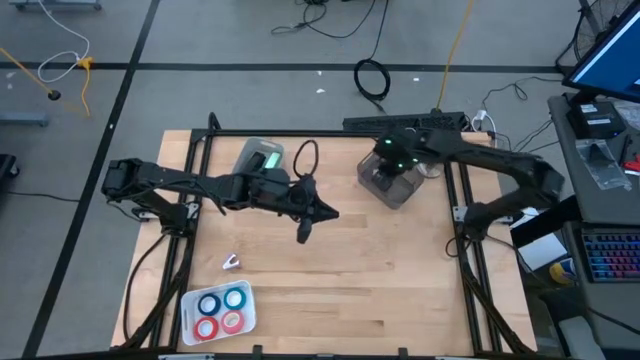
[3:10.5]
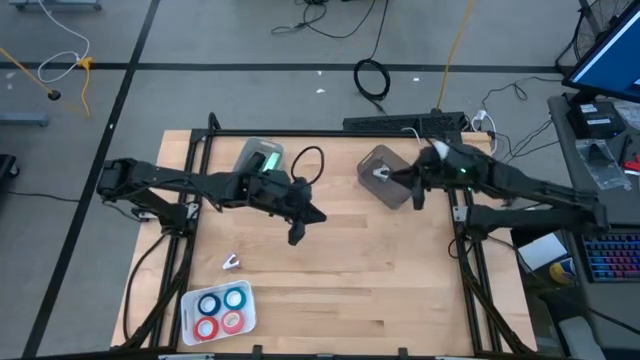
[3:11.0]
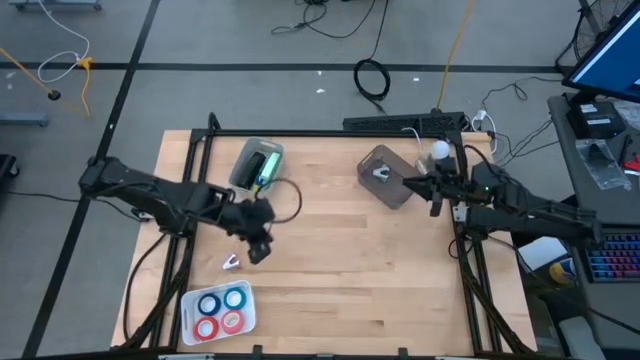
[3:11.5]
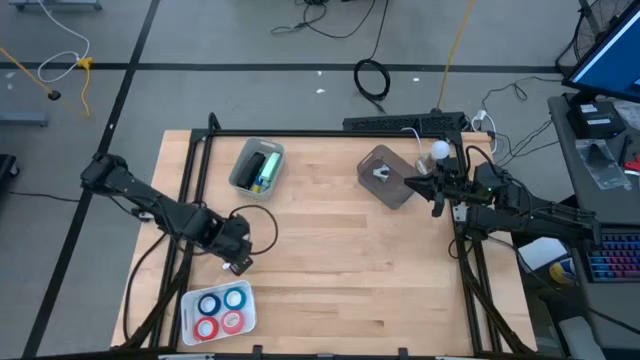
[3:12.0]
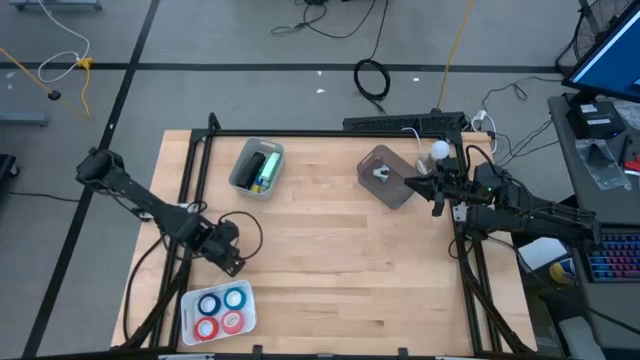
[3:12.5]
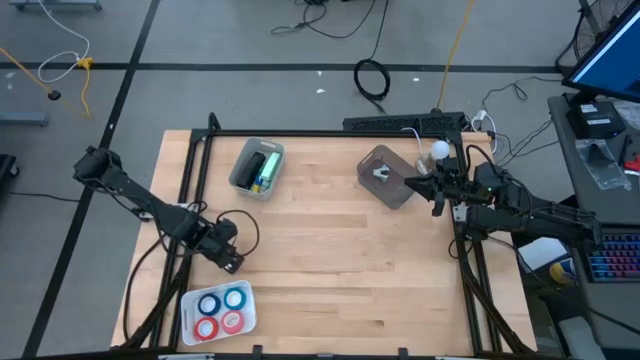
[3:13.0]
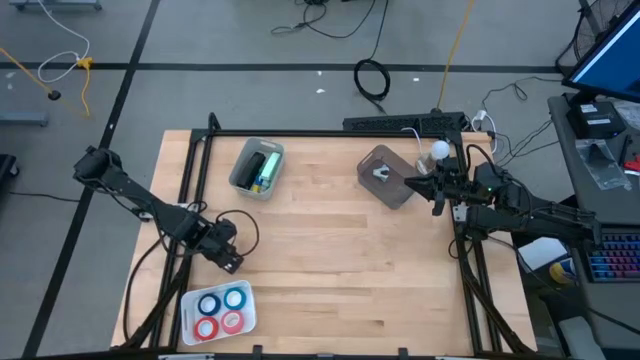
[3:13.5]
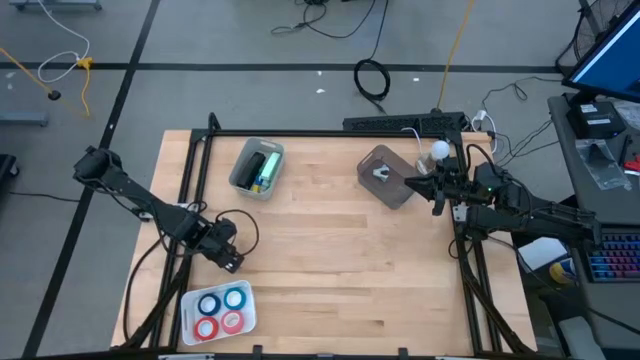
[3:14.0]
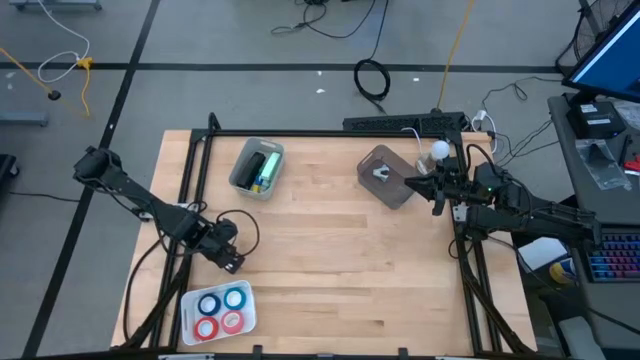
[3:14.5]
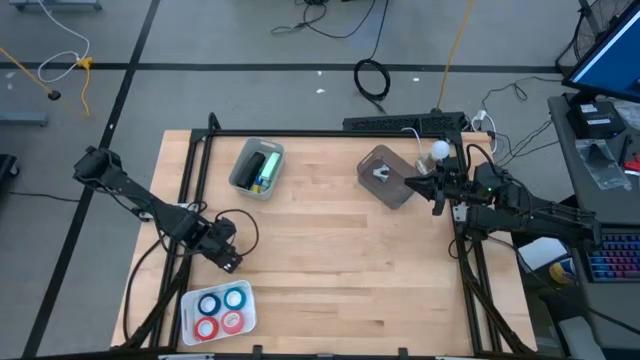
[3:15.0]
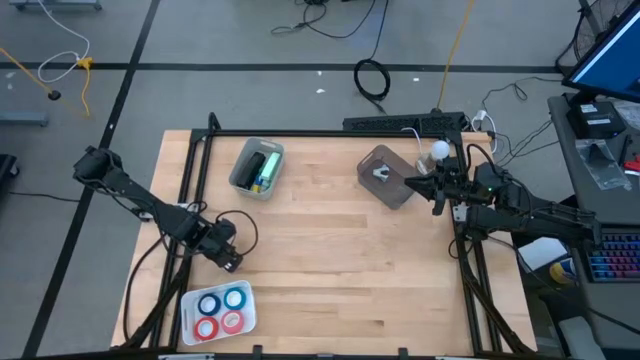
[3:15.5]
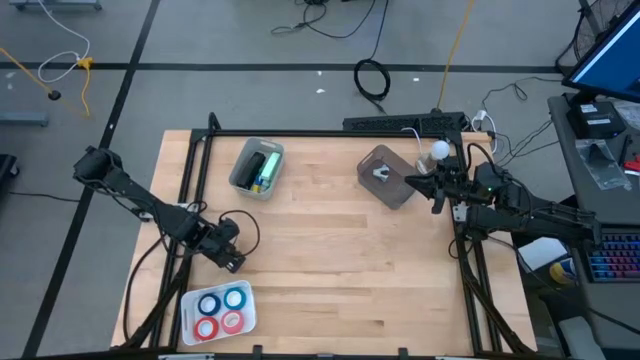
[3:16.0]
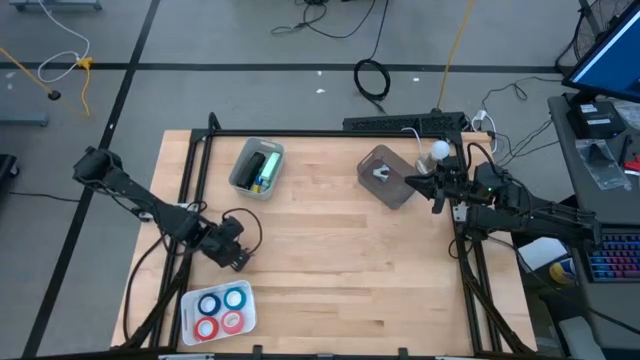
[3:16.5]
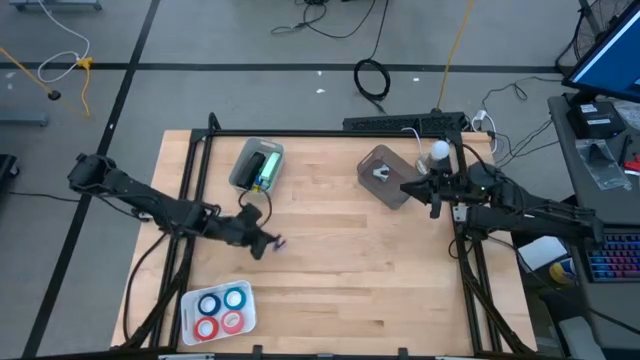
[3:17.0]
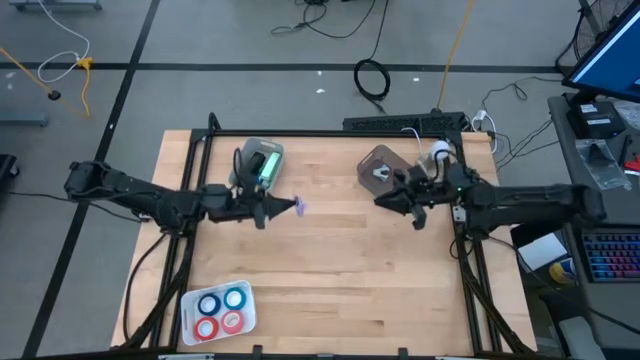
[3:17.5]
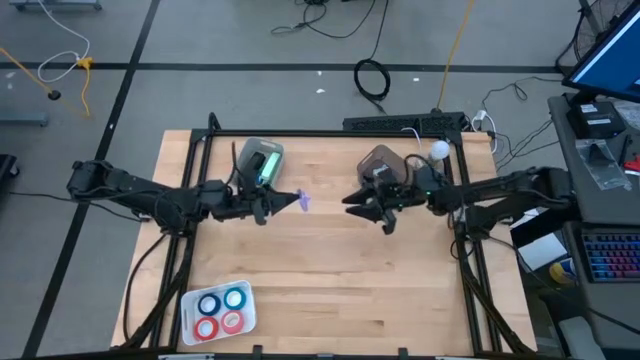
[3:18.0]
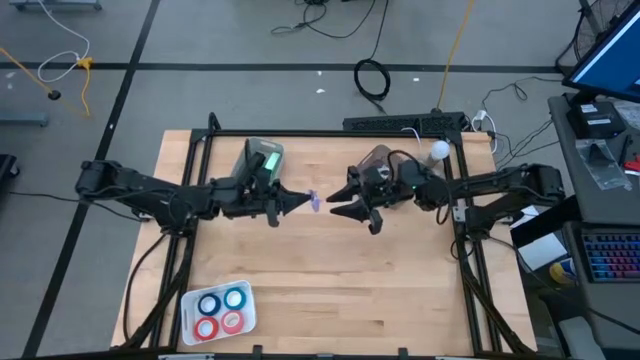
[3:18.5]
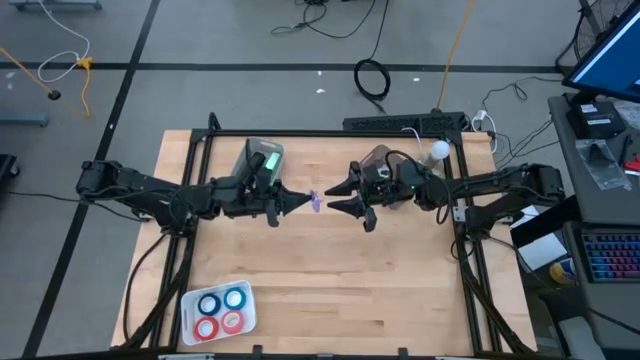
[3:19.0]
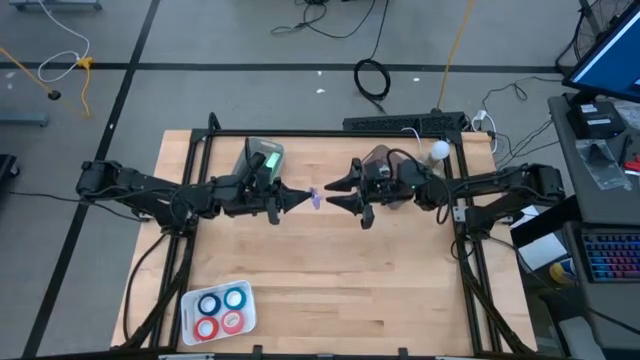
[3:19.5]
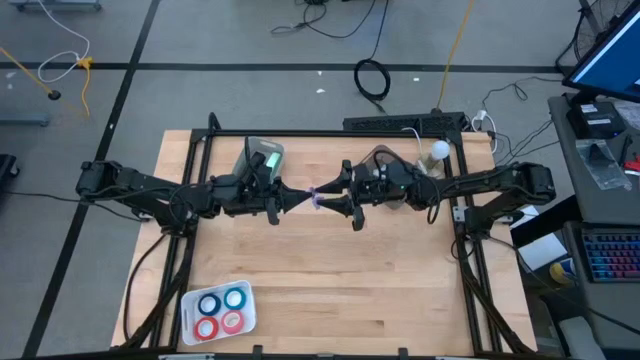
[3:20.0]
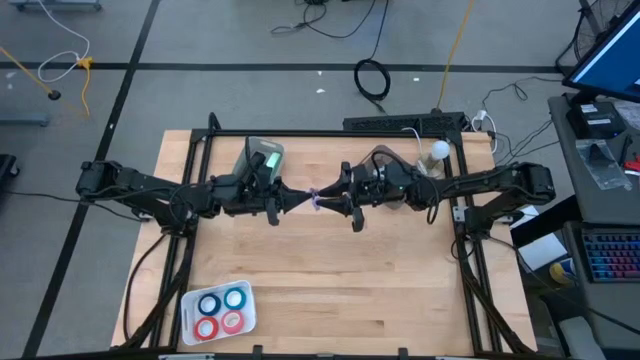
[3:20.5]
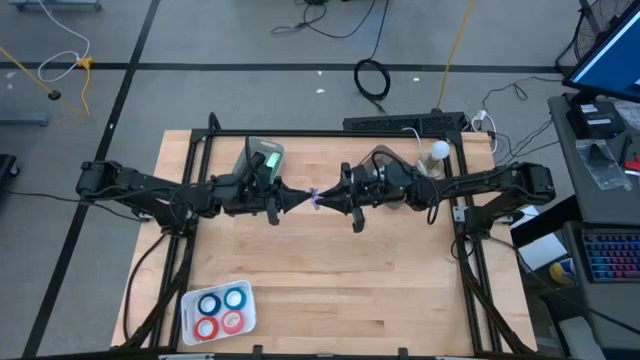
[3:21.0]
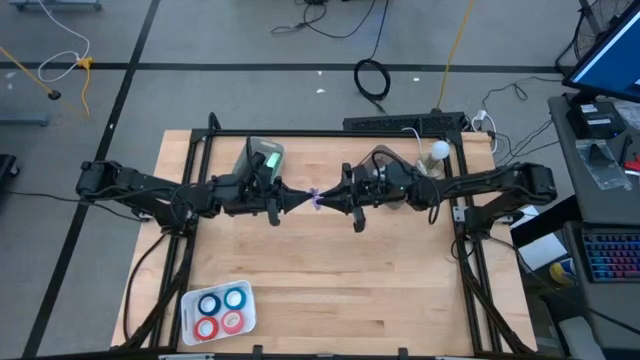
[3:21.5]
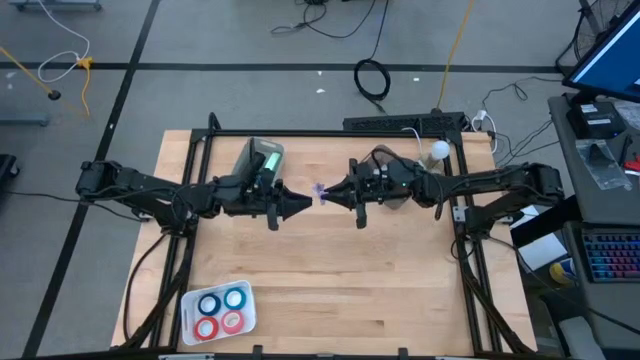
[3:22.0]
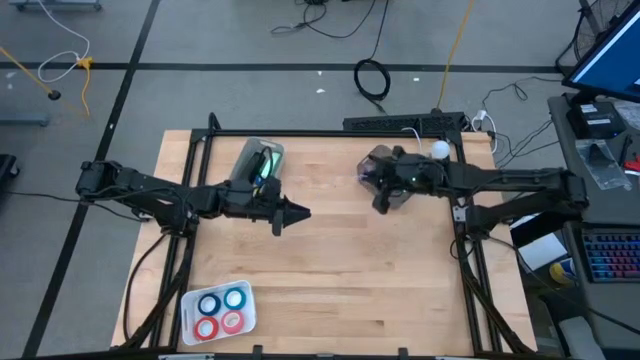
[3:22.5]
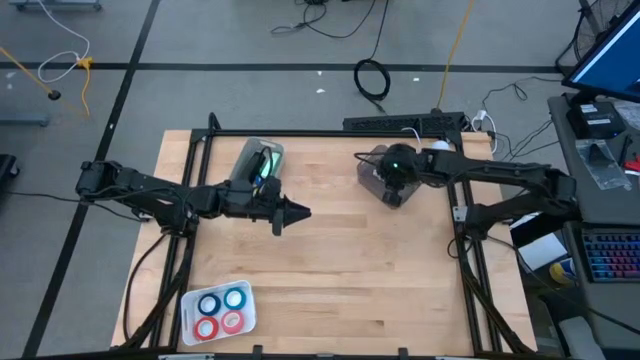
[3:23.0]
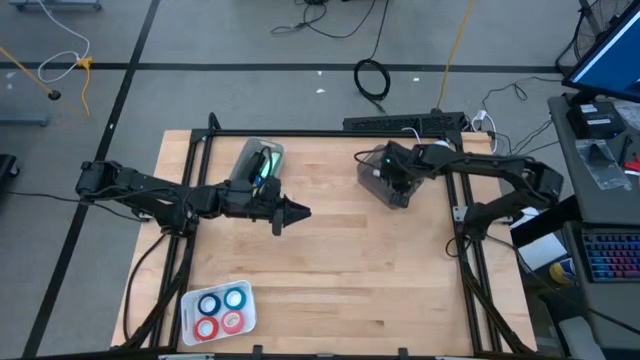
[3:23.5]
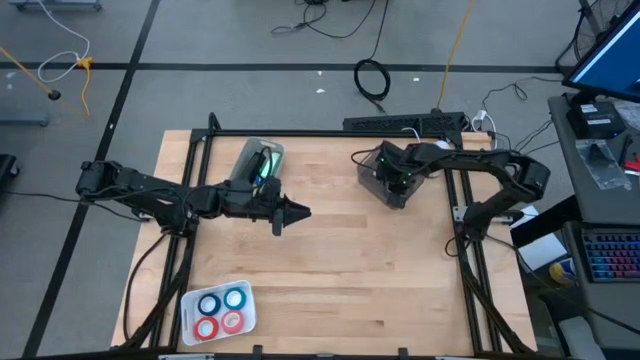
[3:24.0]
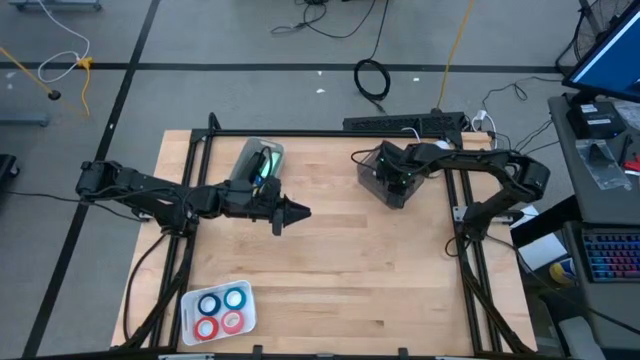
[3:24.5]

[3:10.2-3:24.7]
Task: Pick and place Stapler, Stapler remover, tape
Put the purple stapler remover into the black bin

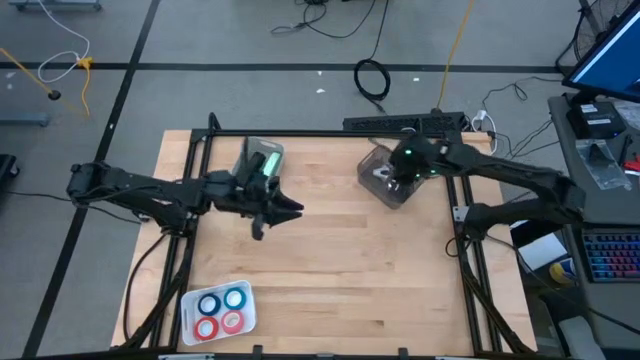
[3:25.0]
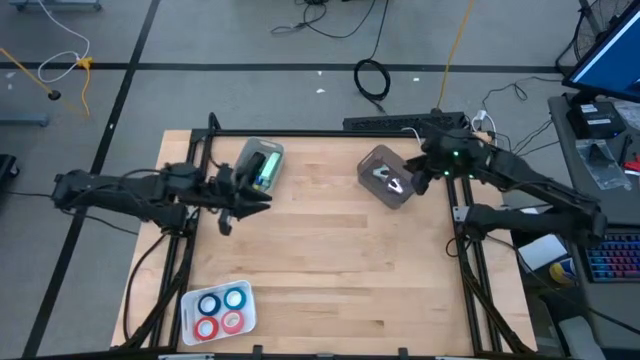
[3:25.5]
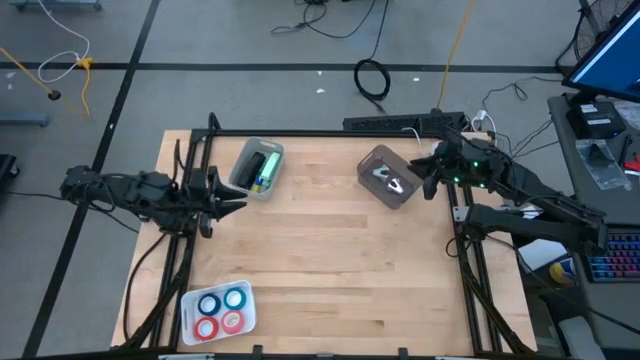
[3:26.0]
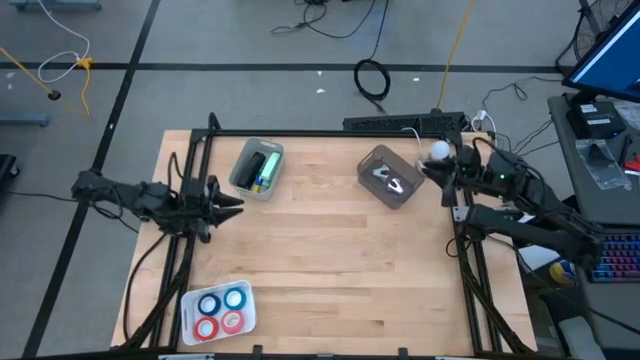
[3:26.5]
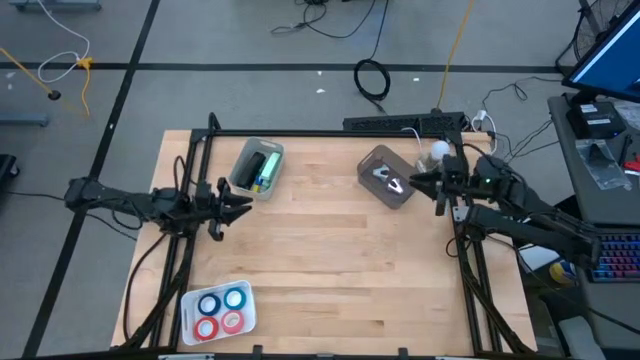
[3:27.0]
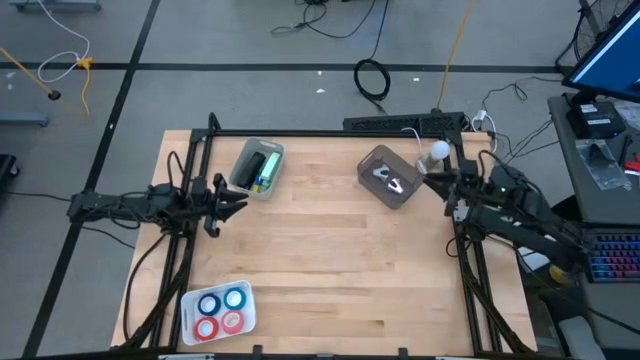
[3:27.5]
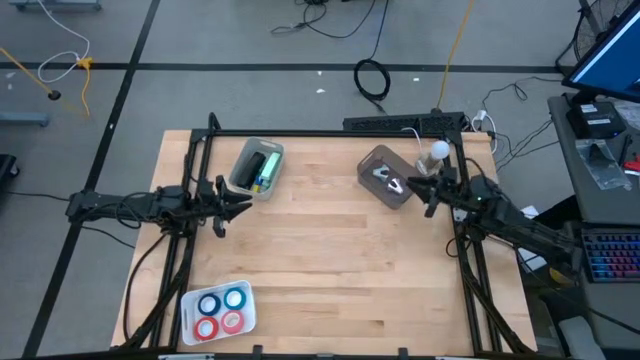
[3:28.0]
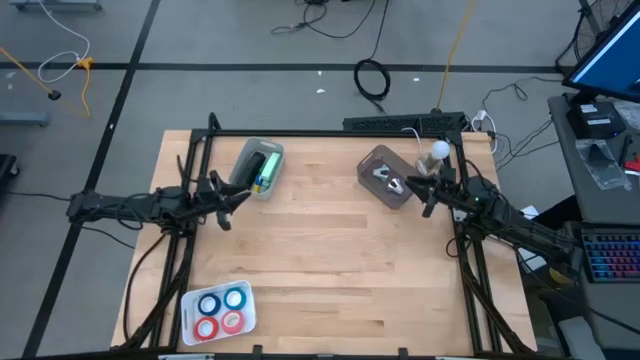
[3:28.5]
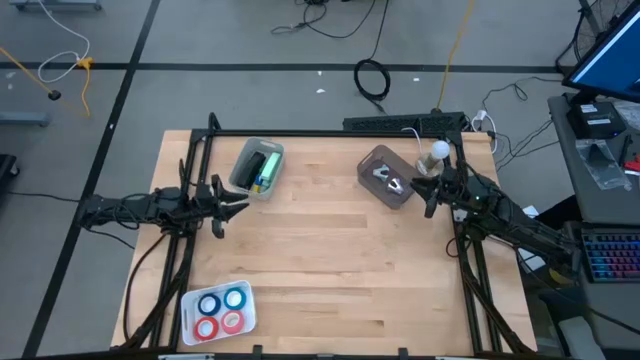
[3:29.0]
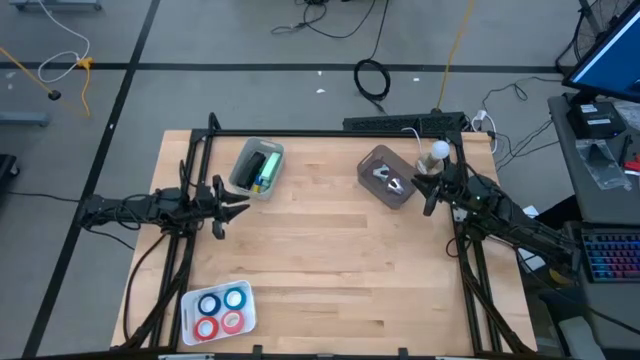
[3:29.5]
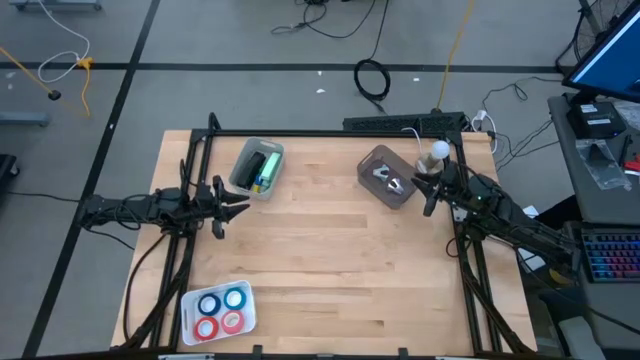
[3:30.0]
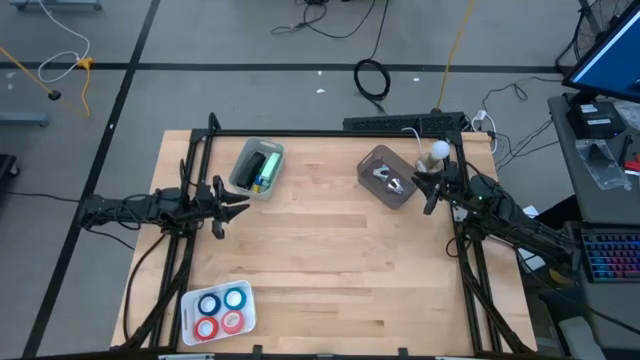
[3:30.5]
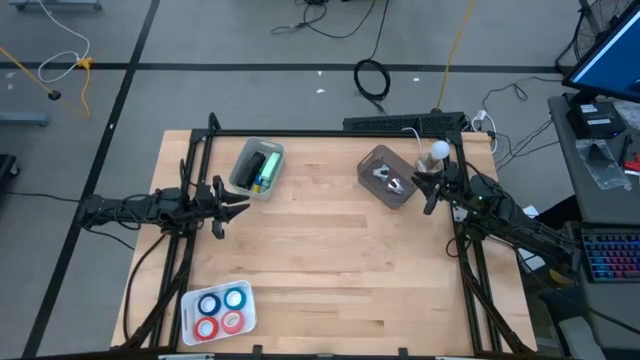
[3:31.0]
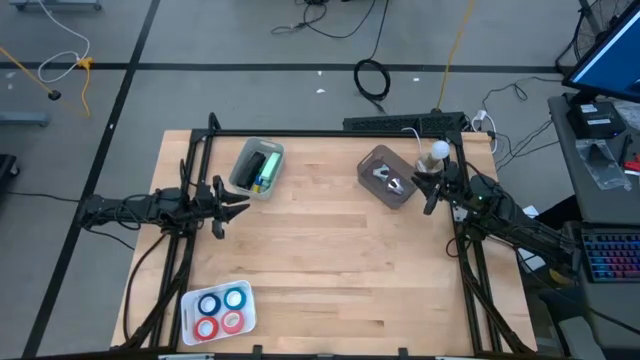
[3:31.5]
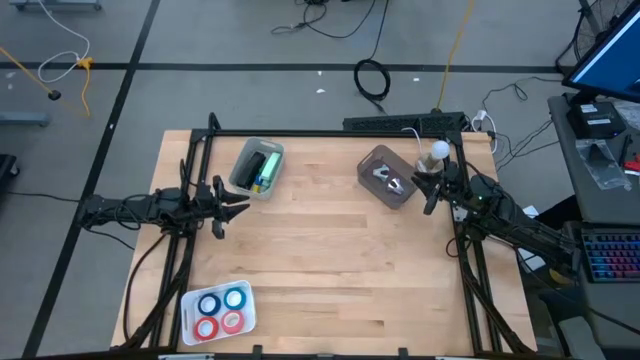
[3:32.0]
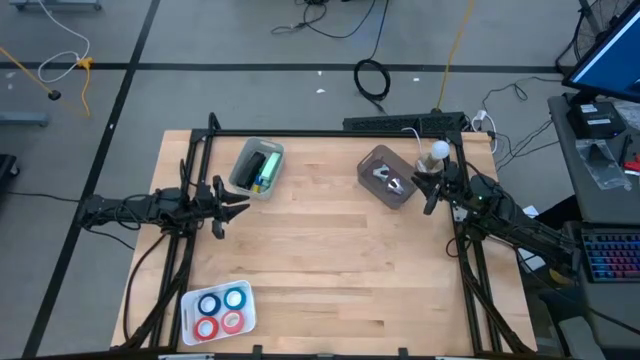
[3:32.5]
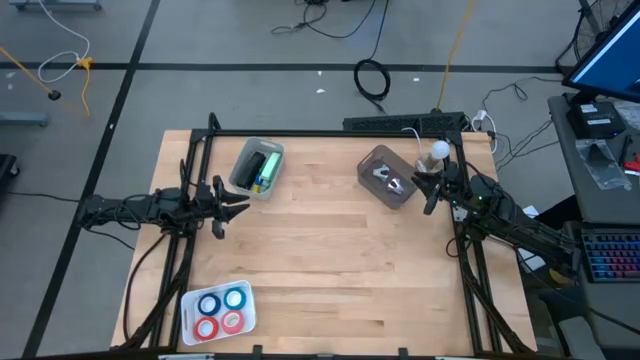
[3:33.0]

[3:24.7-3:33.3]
Return to Home Position
